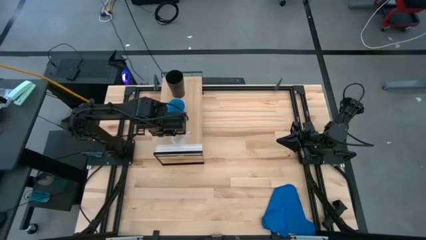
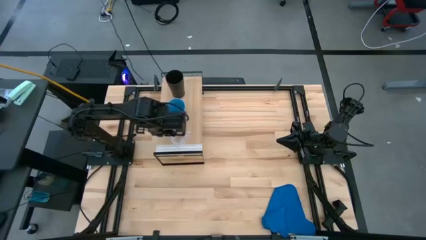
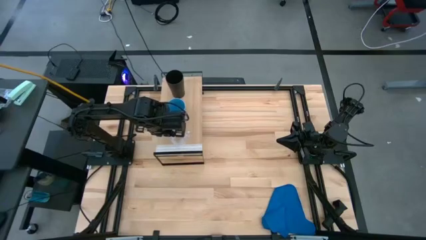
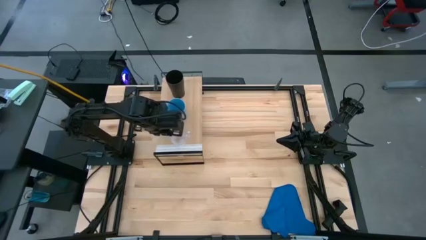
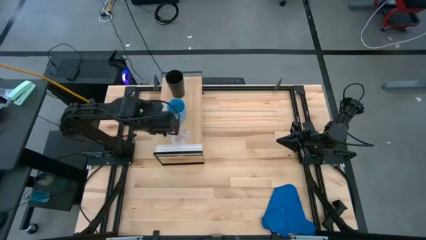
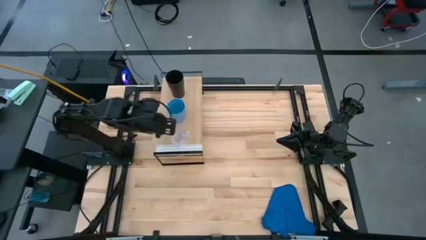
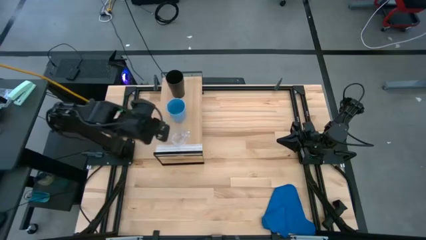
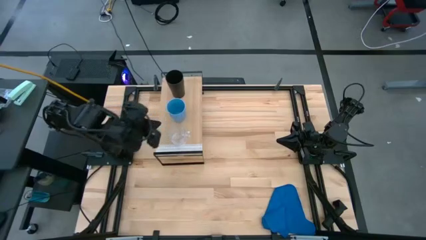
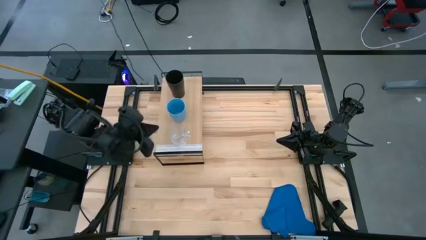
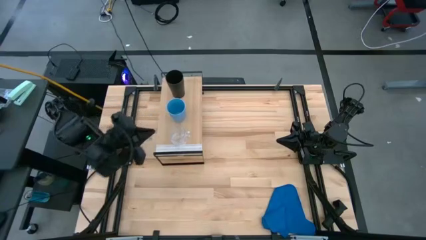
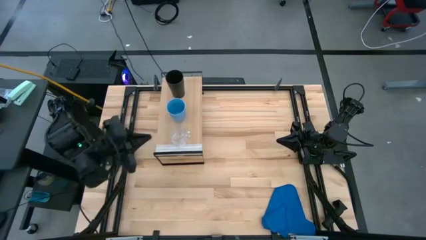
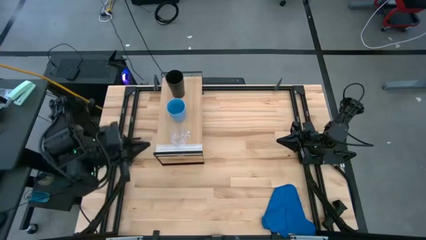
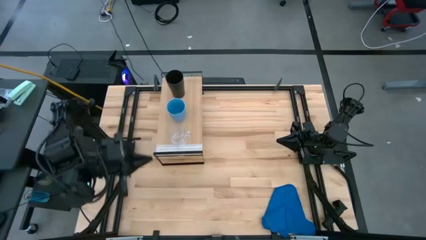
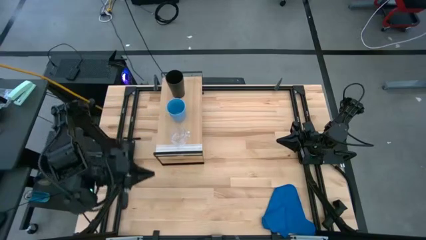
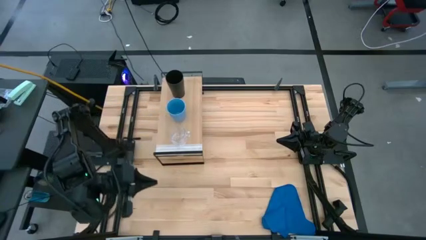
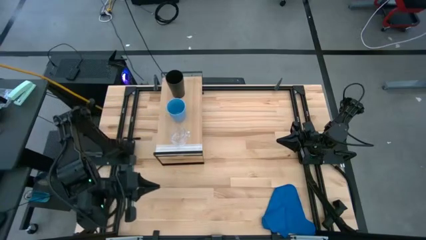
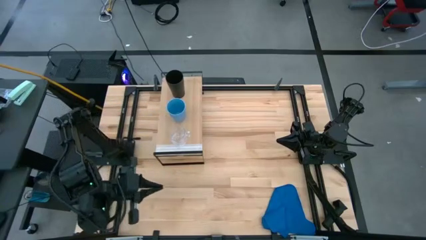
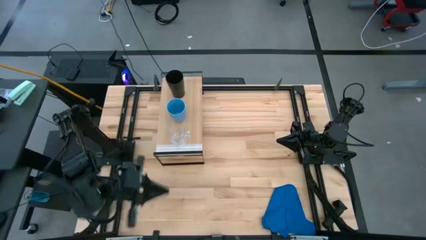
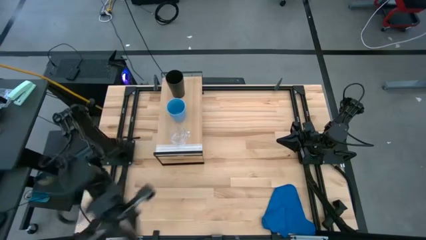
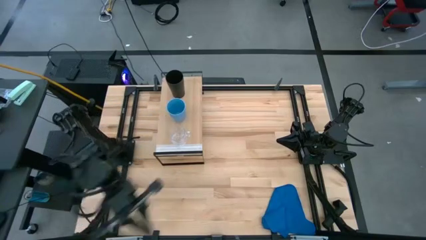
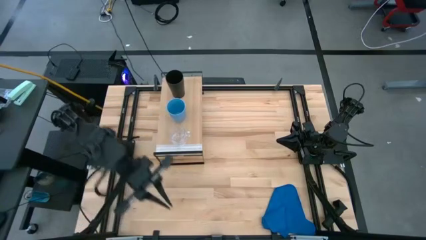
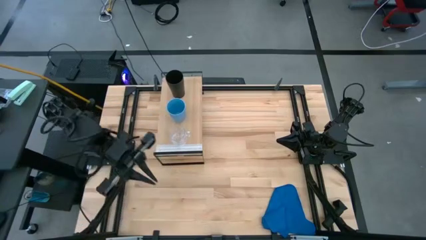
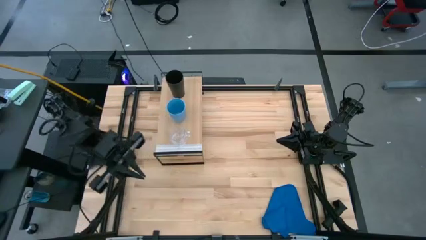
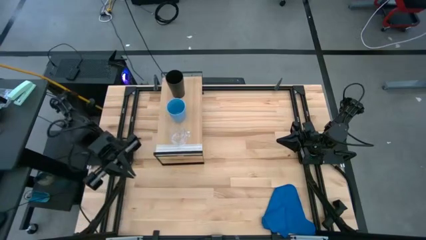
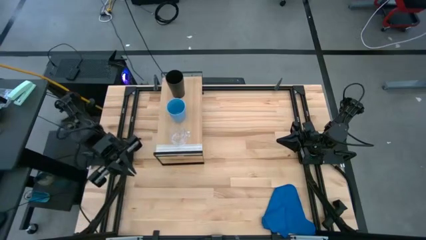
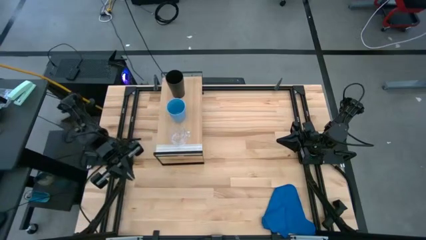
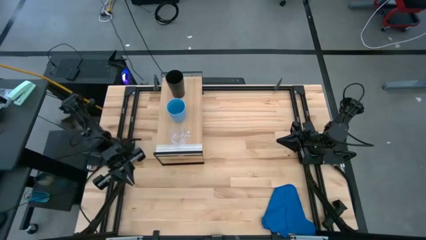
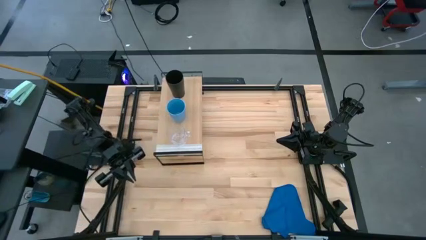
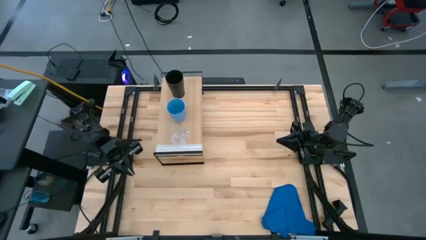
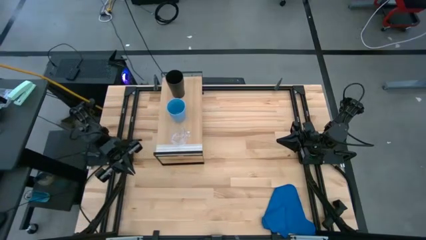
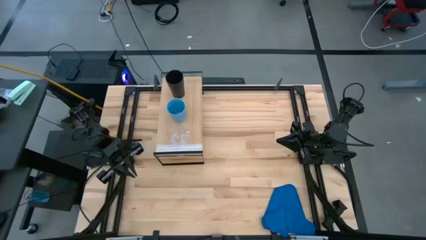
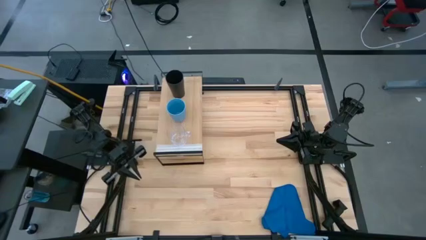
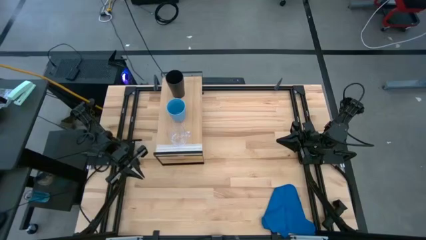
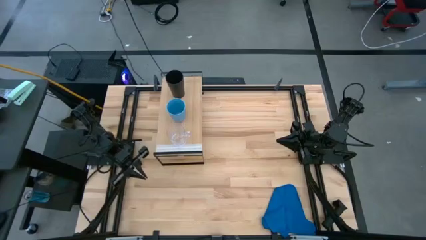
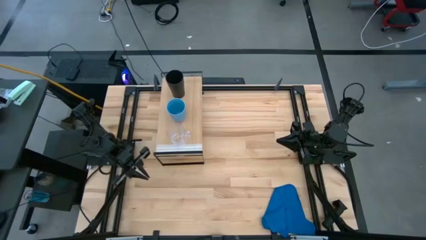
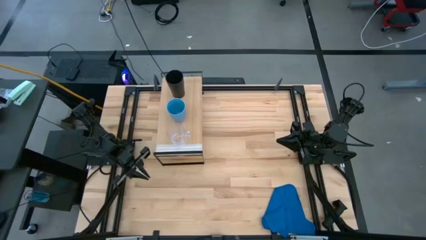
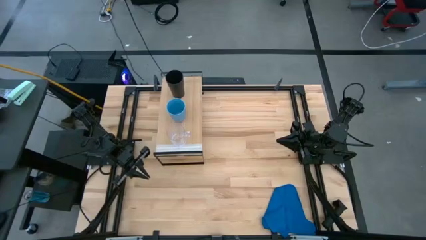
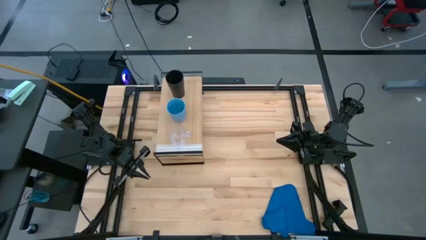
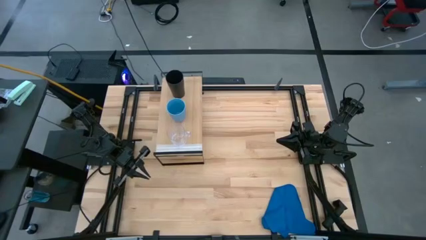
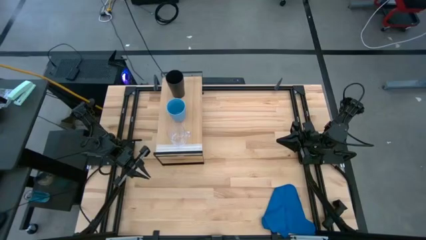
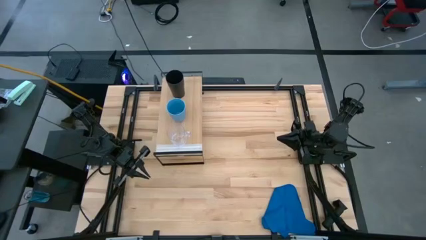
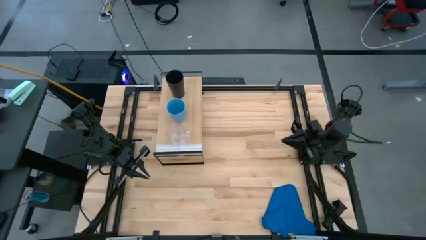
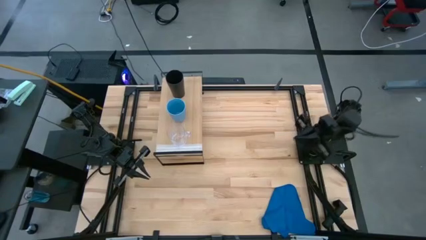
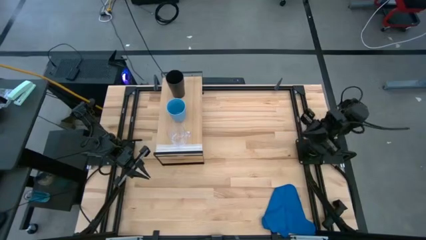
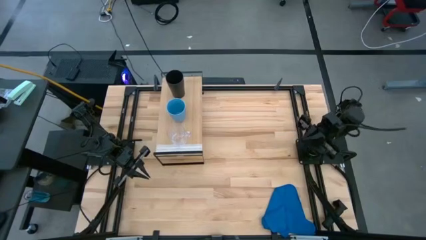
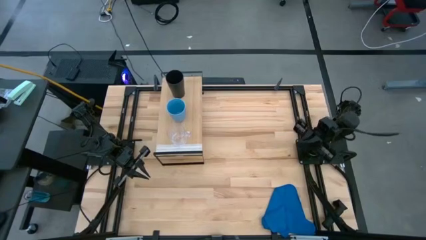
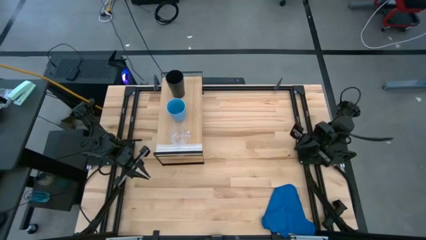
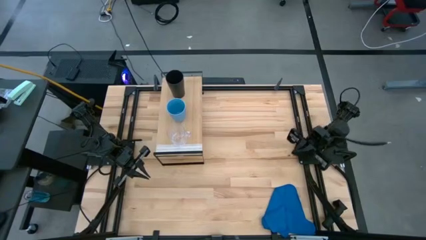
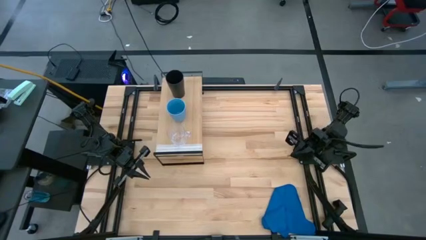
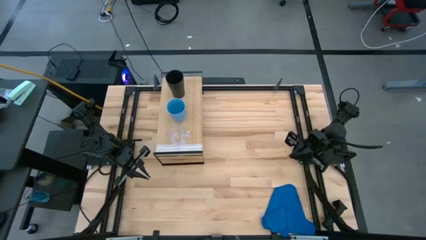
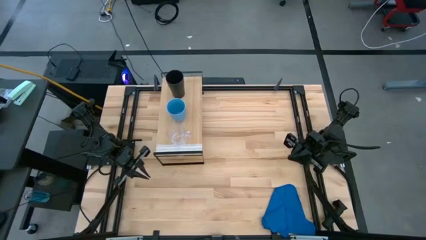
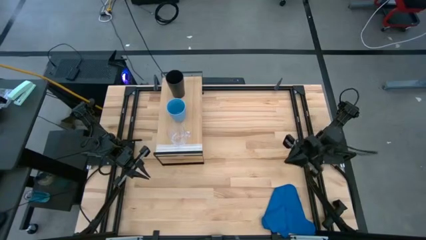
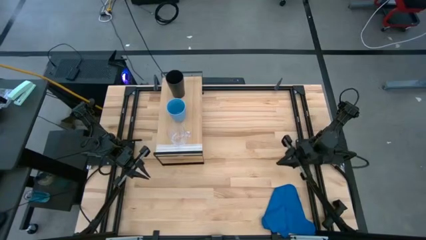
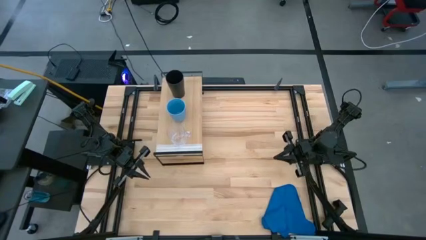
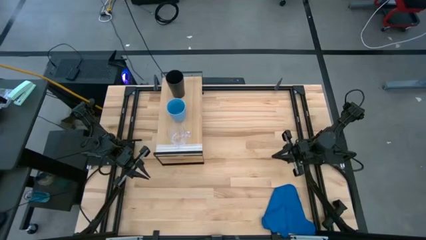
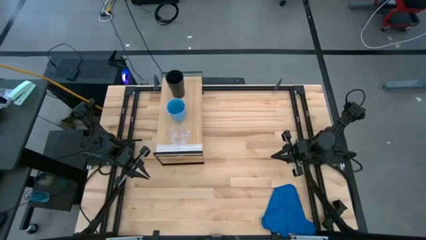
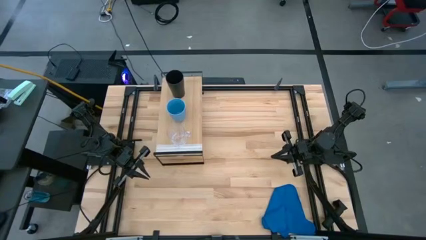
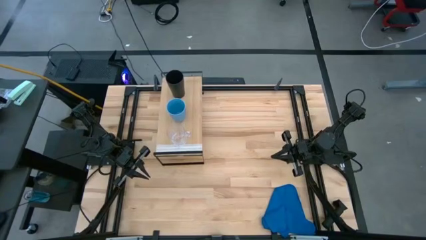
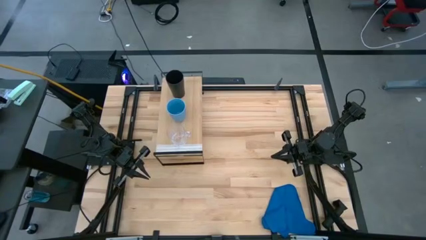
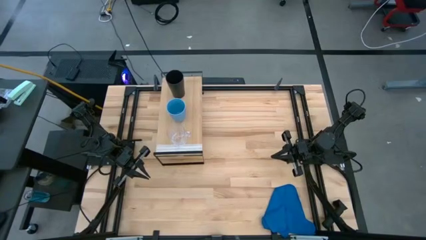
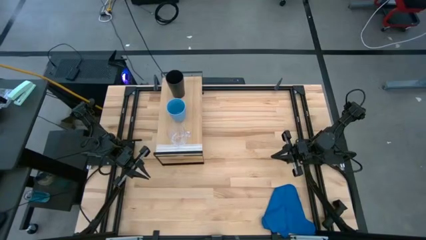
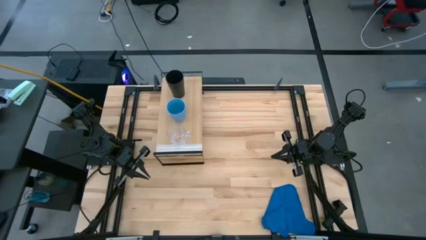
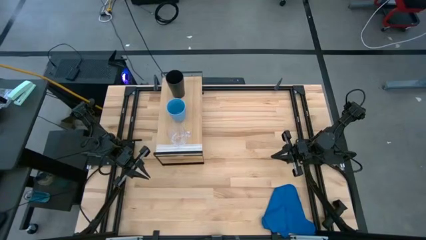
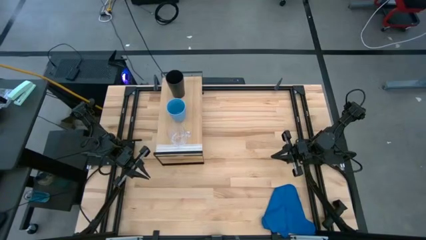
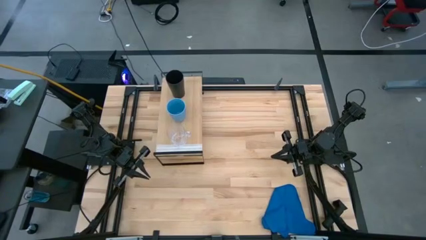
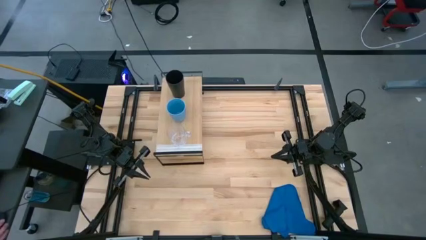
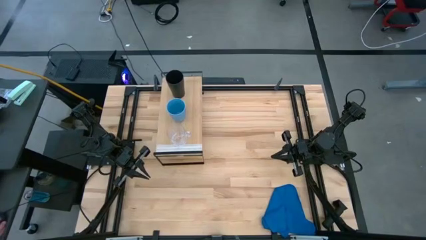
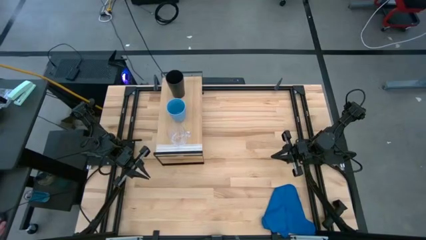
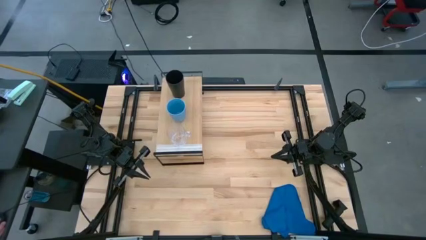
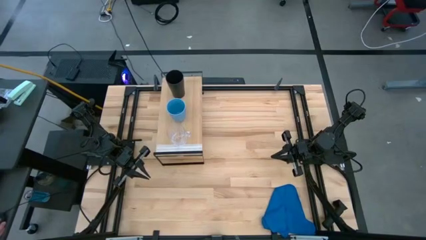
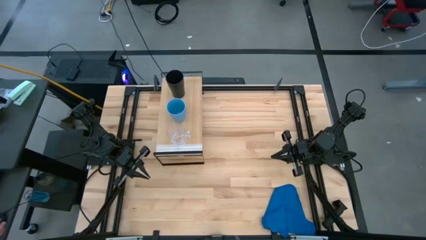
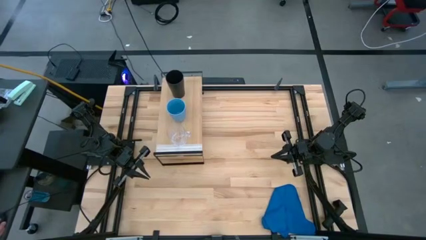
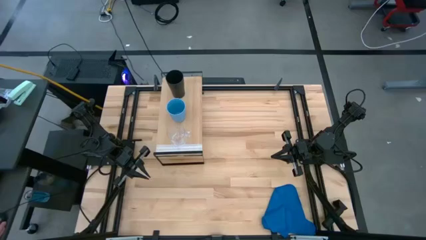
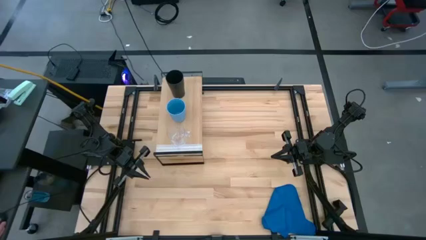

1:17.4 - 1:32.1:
Task: Stack small to large cups/mugs on shelf
Return to Home Position
